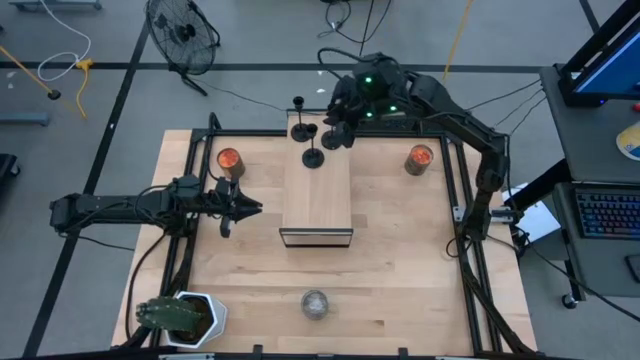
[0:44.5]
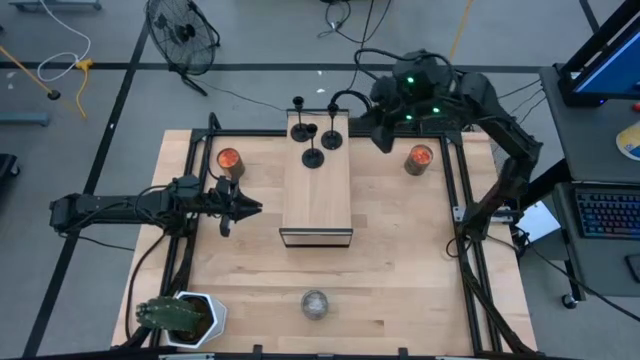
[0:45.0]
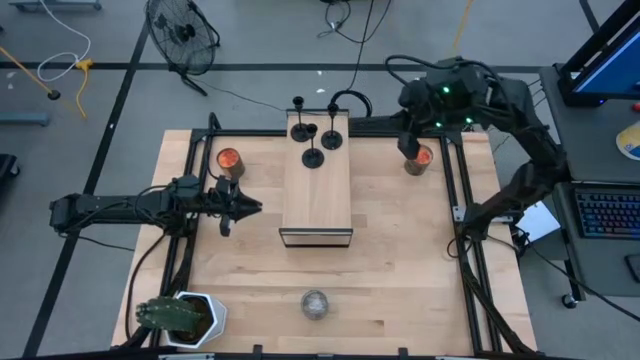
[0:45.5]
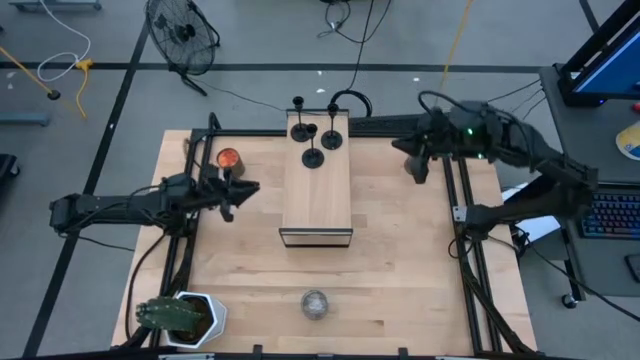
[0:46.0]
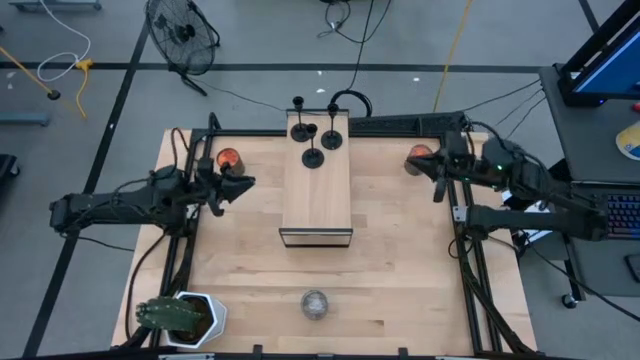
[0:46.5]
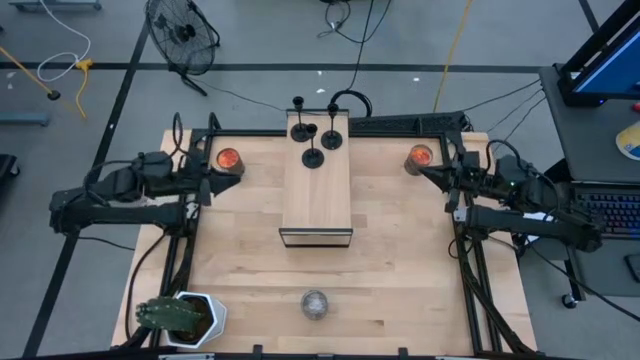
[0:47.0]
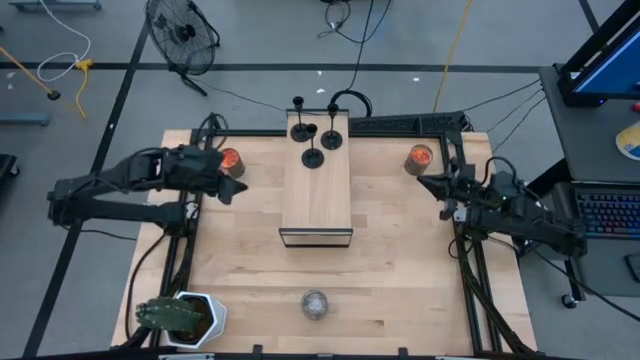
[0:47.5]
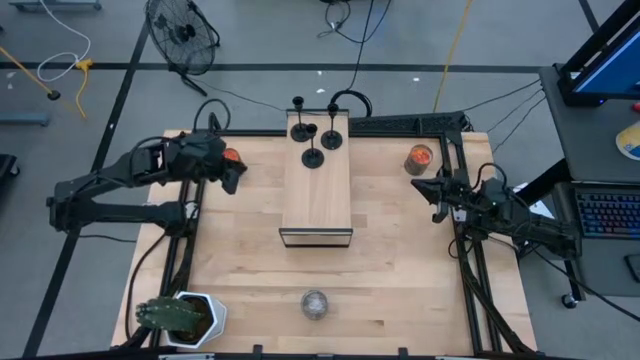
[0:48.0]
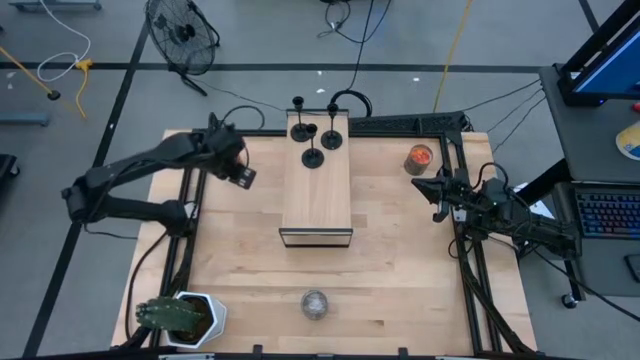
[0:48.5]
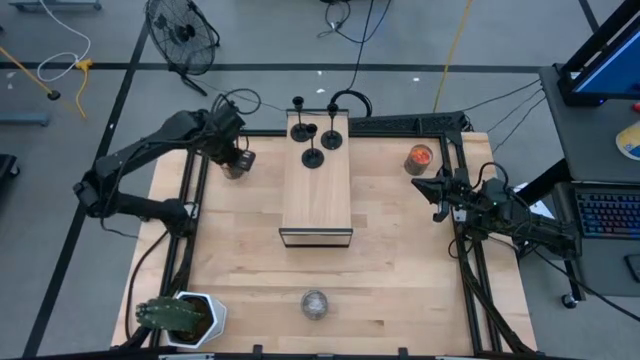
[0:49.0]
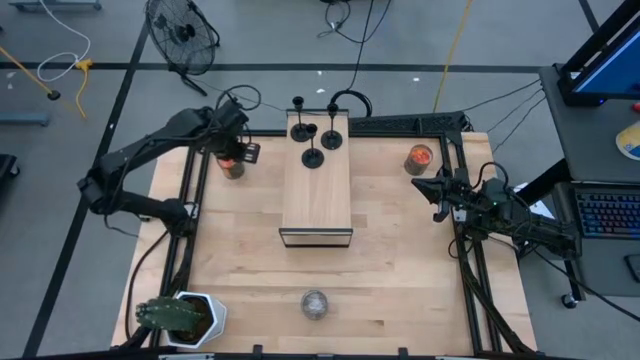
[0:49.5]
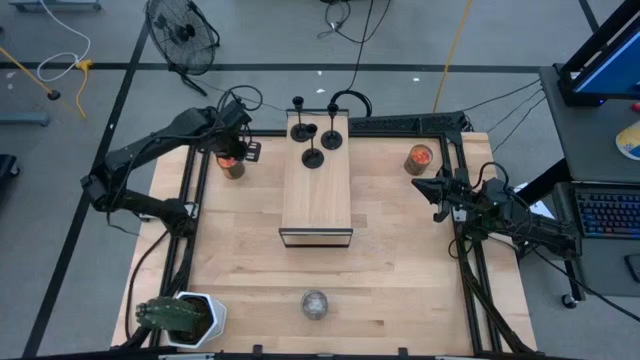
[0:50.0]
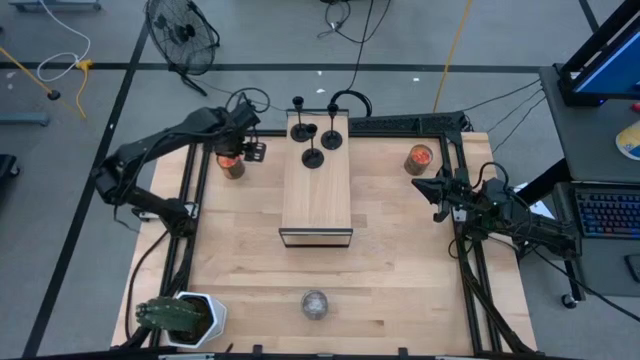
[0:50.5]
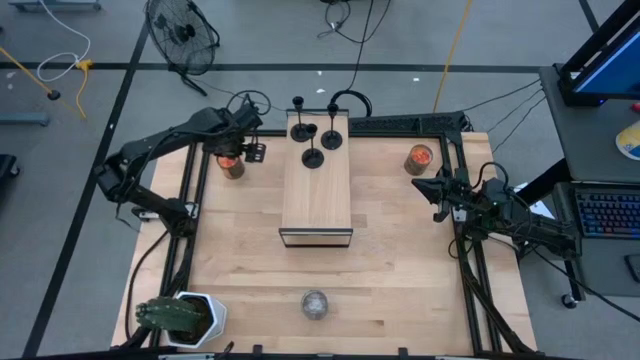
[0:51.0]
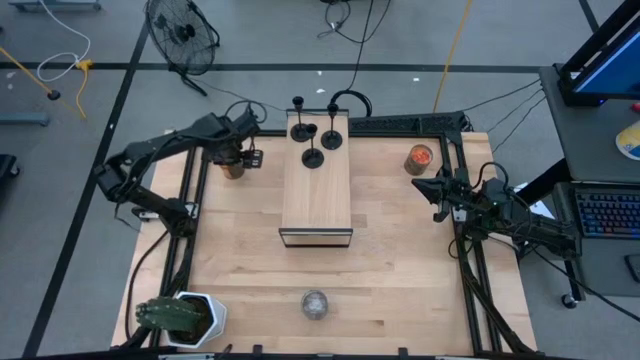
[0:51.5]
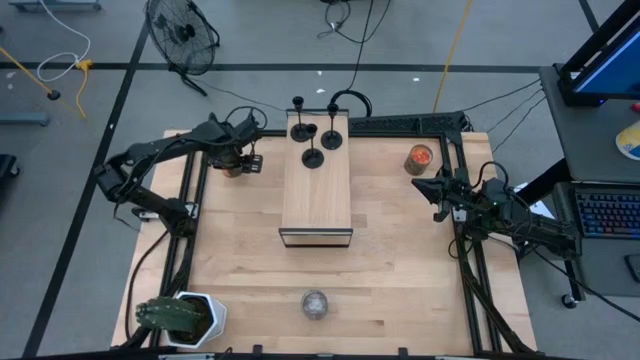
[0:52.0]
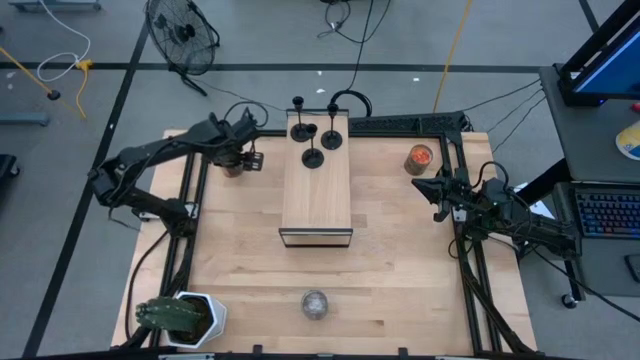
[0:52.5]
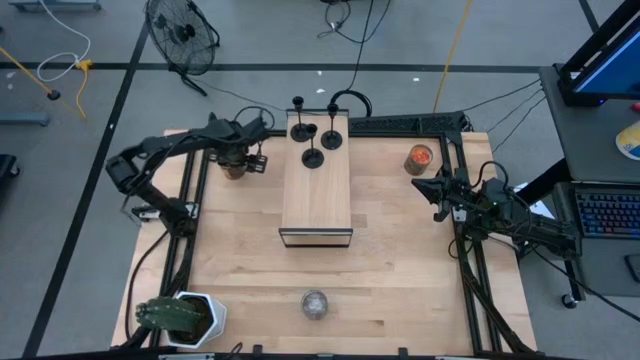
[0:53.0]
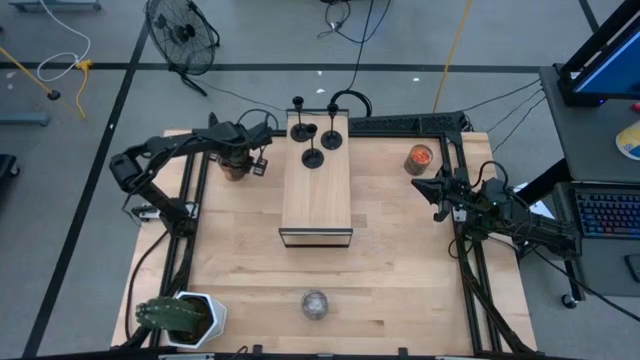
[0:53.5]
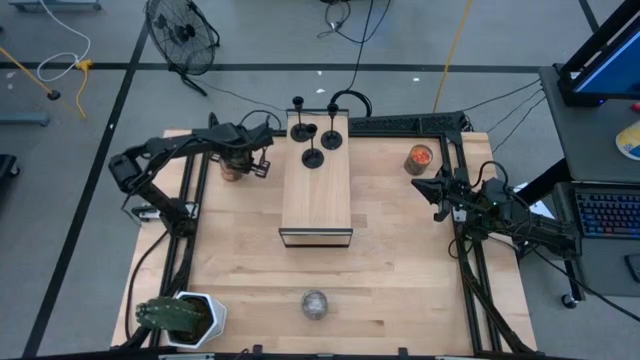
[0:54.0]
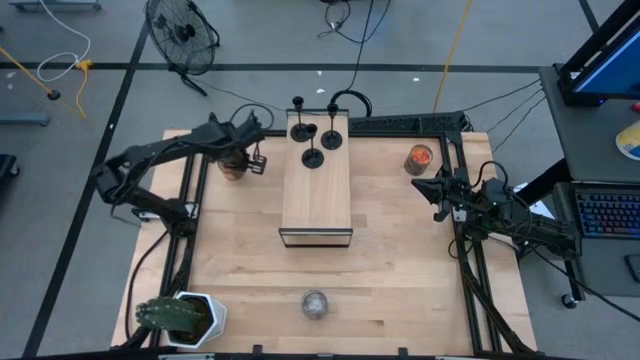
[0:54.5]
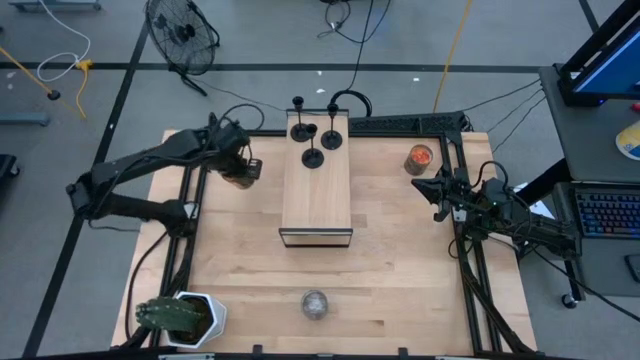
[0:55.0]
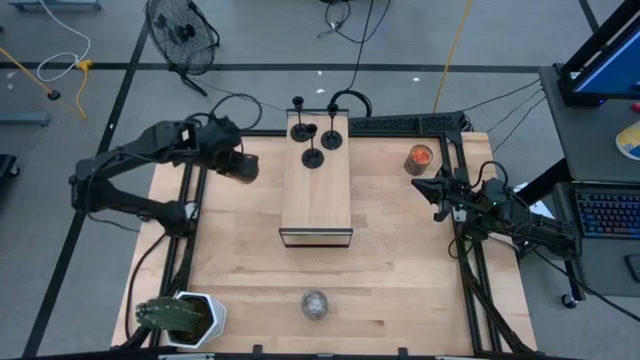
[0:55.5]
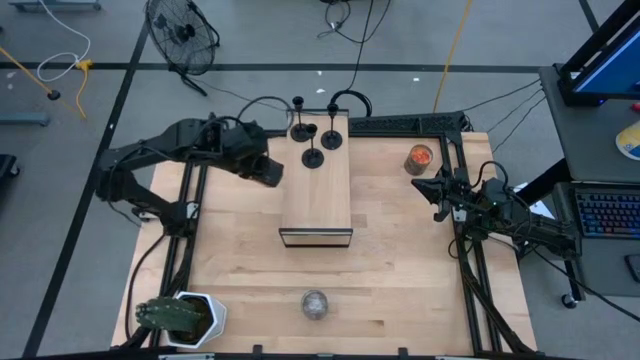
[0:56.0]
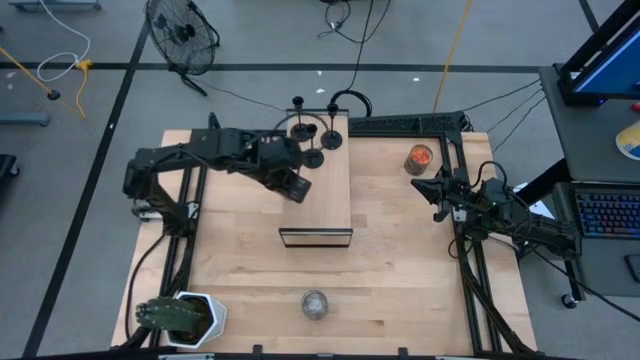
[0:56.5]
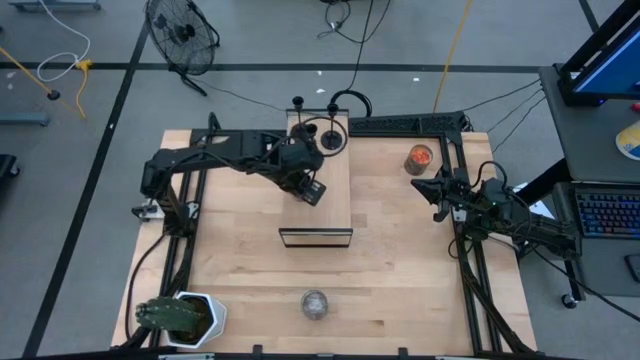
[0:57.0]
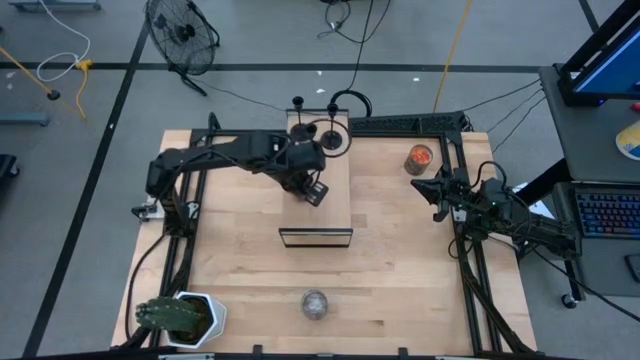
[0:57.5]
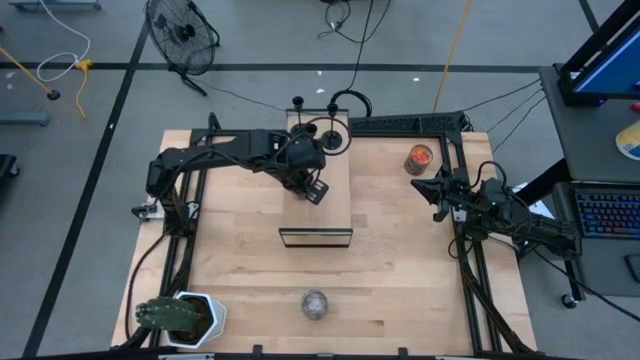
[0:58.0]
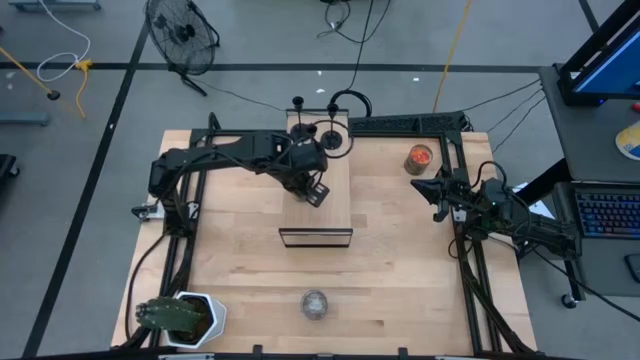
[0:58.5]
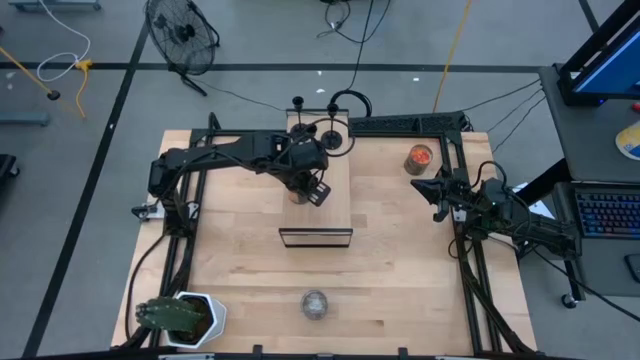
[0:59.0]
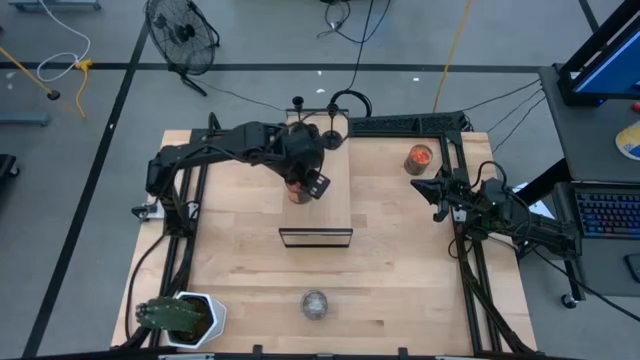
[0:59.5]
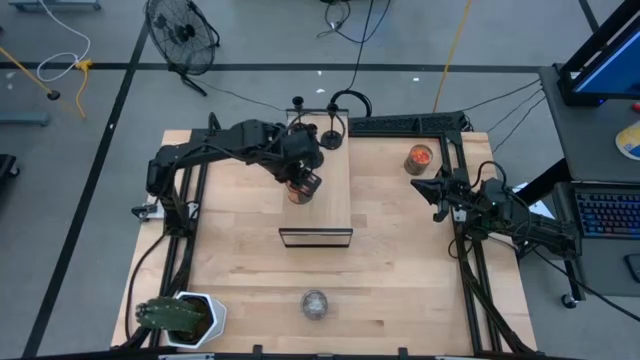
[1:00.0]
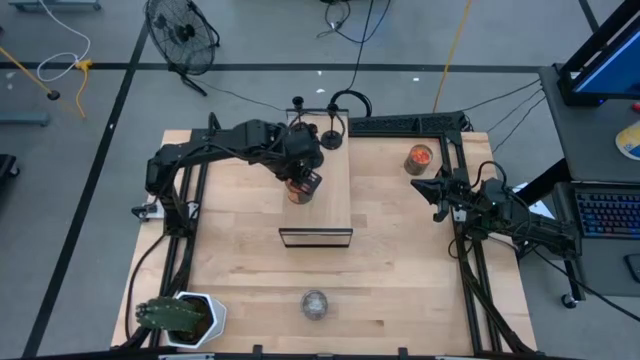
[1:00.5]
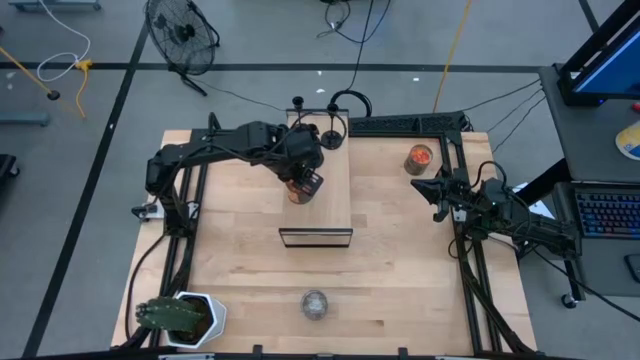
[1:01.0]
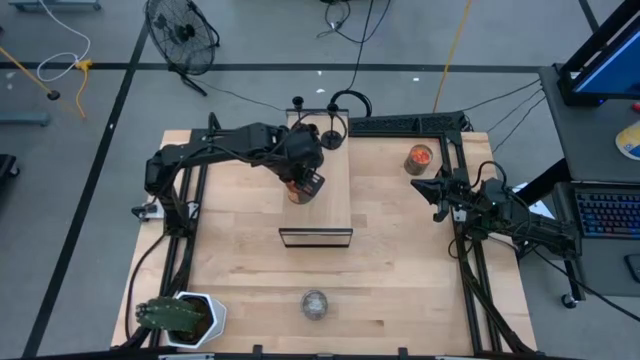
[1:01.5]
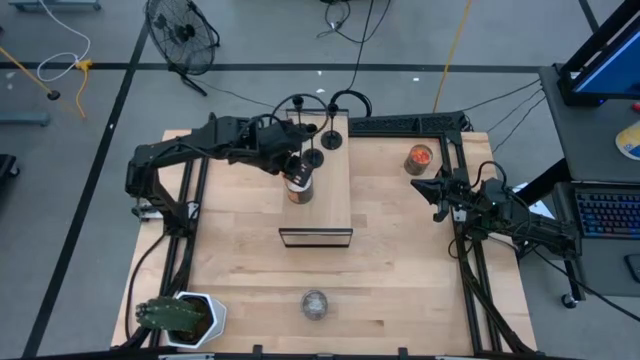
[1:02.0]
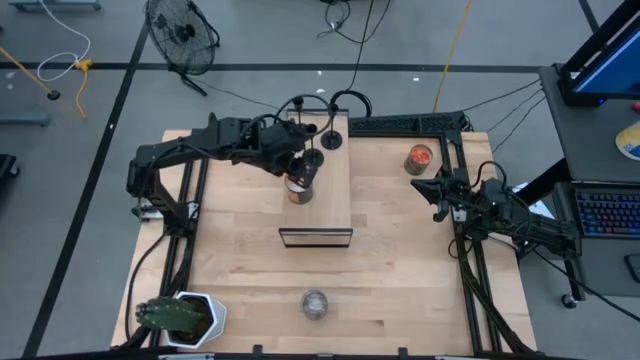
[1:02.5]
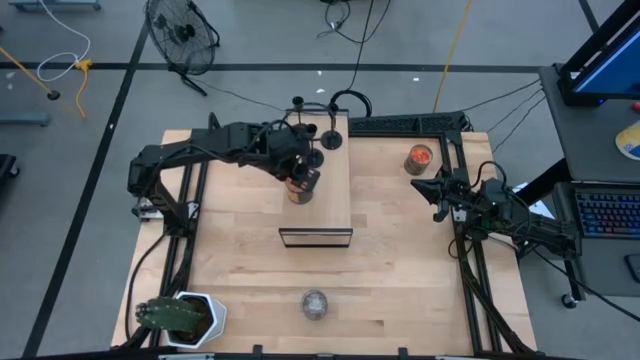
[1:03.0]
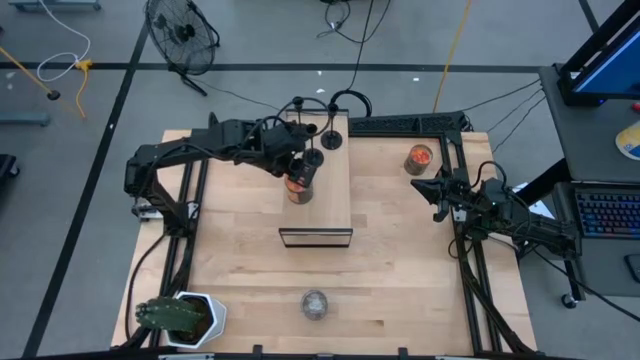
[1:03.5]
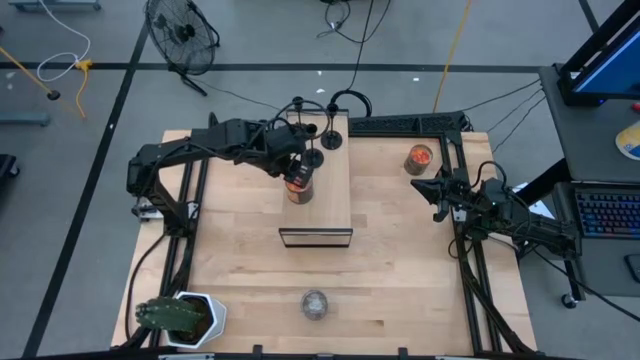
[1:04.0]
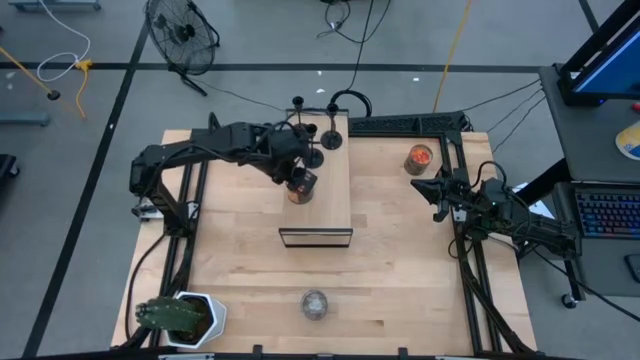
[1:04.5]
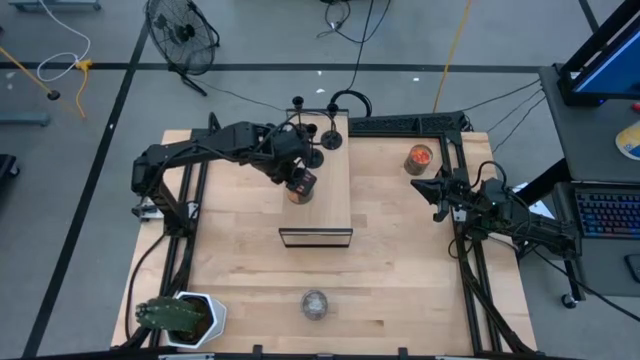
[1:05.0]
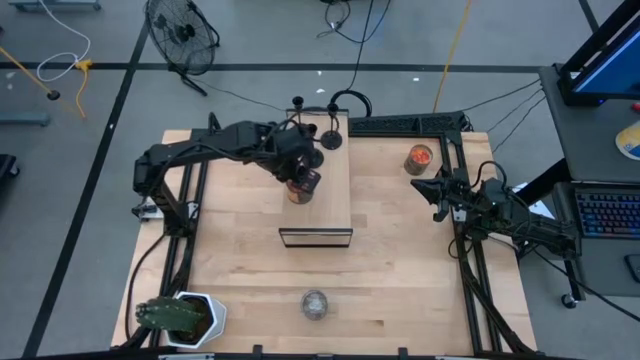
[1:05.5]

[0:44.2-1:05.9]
Task: Pick & Place candle stick holders
Put the left orange container candle on the shelf
